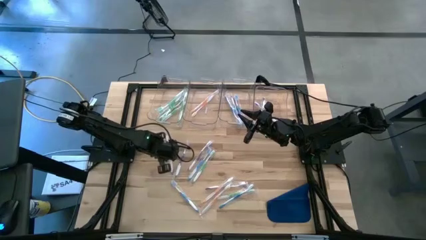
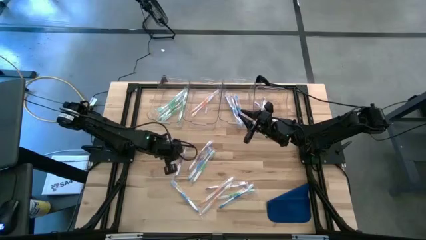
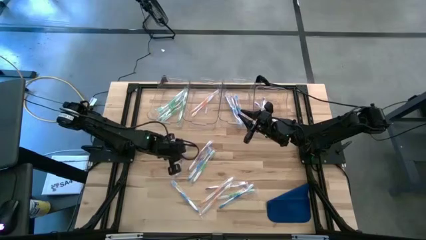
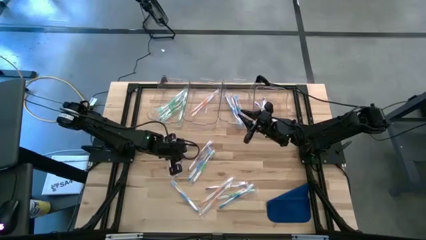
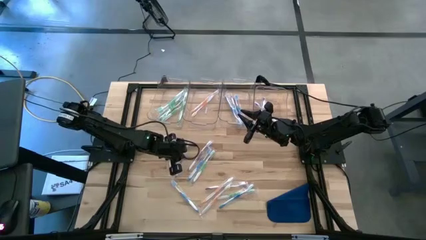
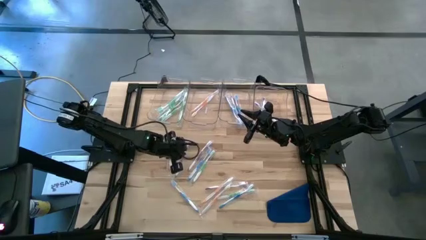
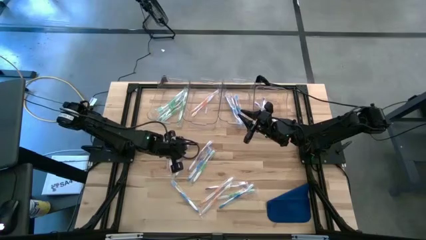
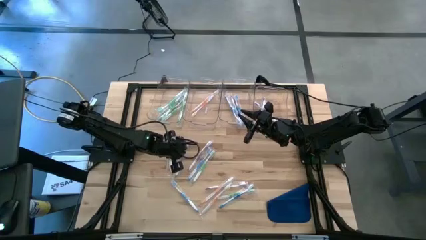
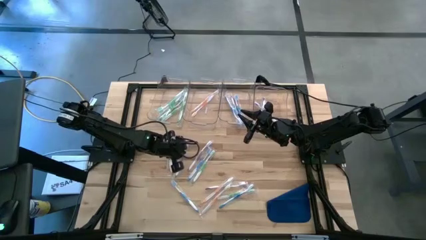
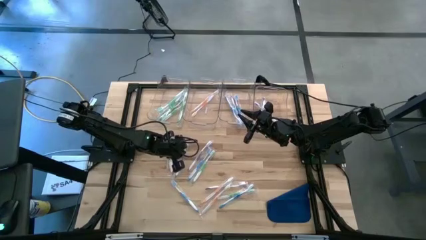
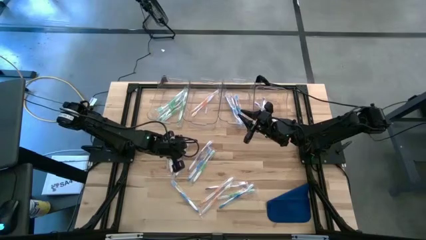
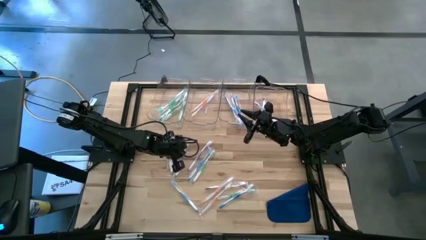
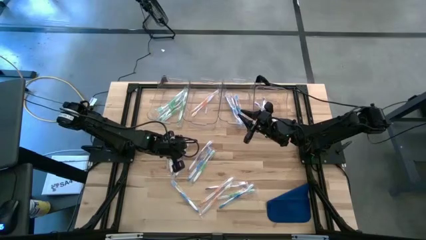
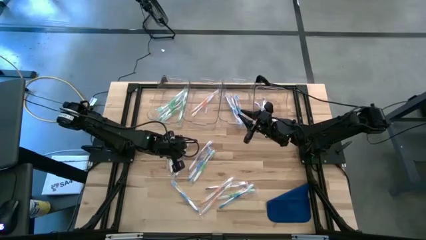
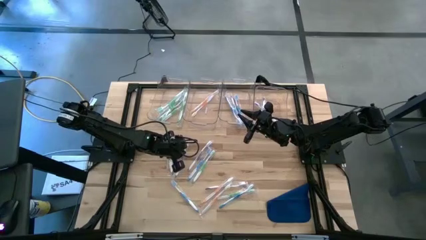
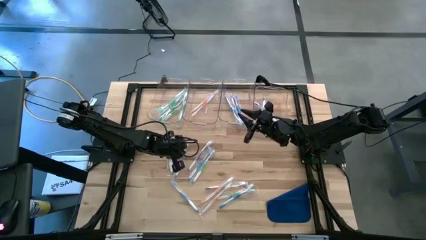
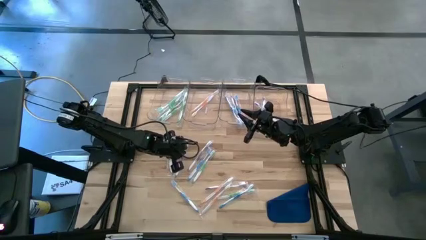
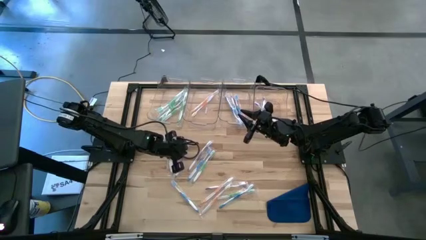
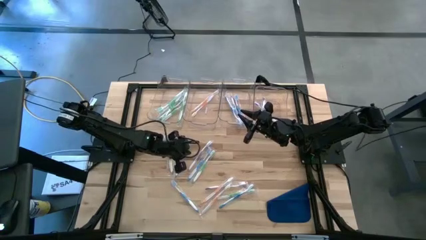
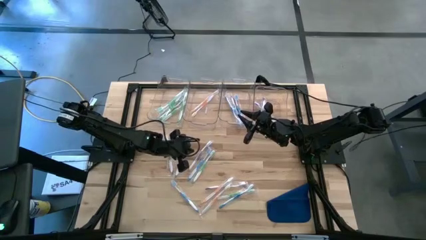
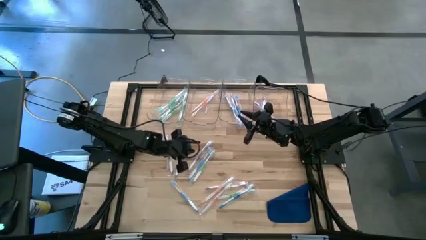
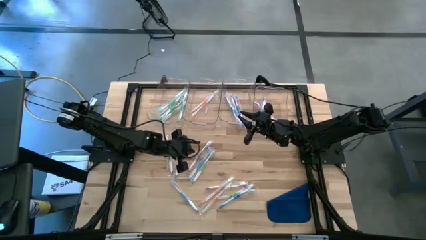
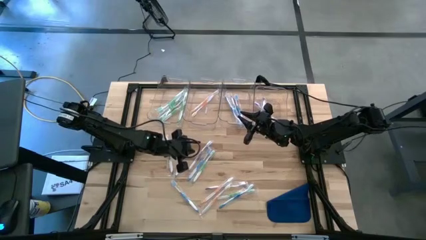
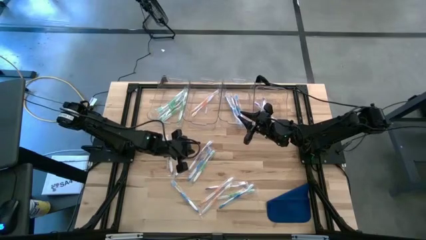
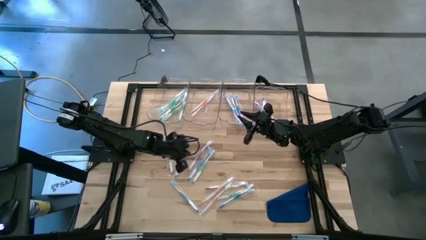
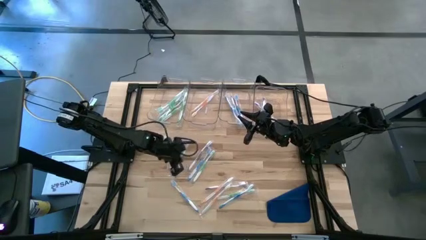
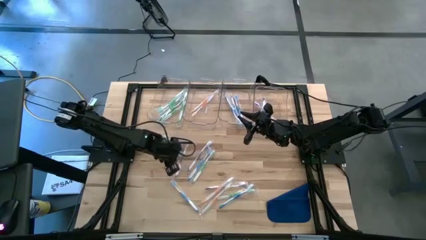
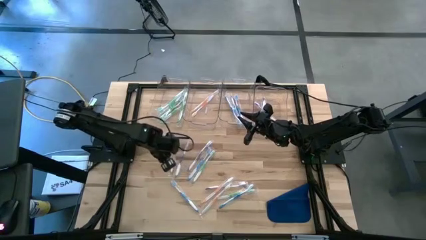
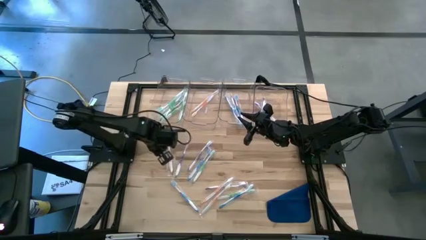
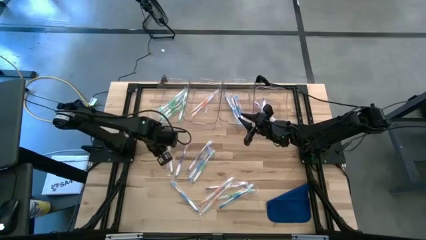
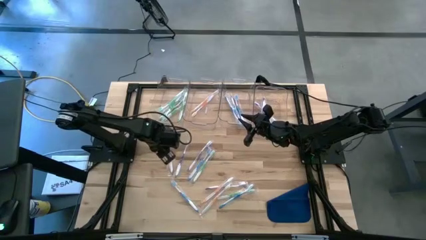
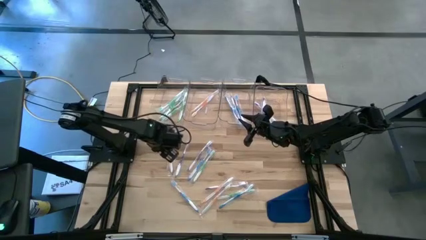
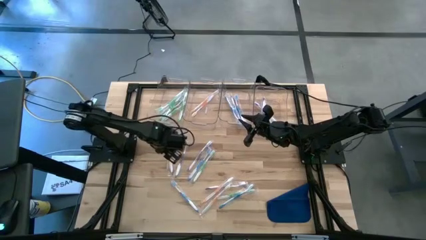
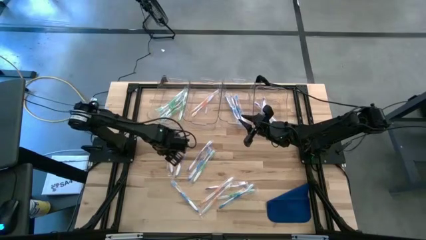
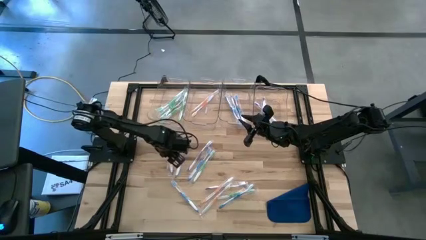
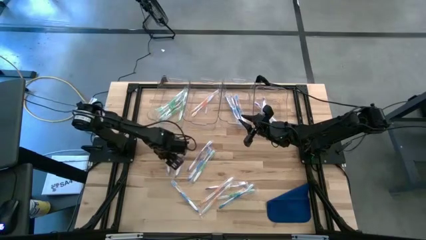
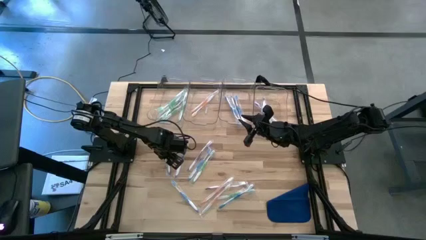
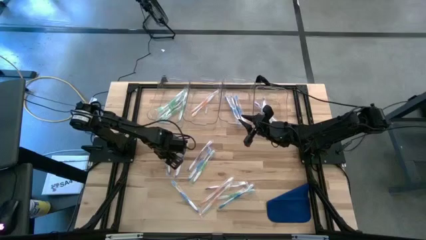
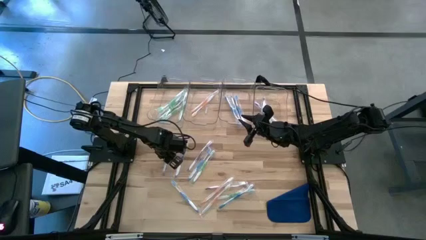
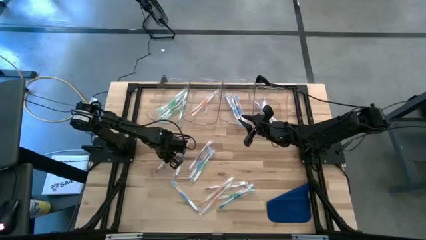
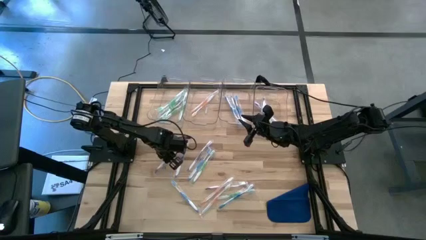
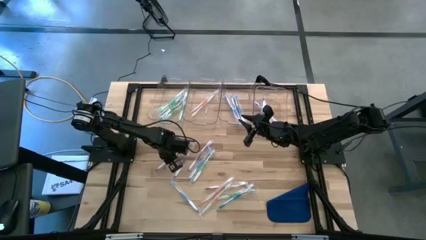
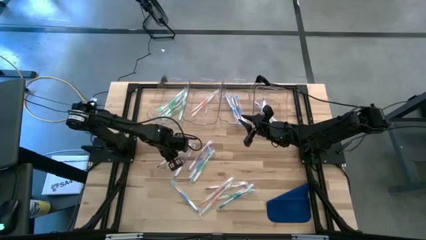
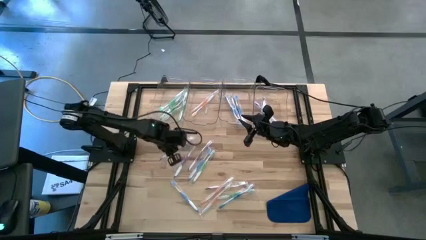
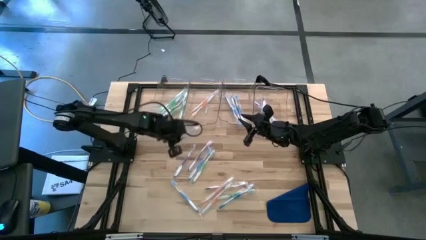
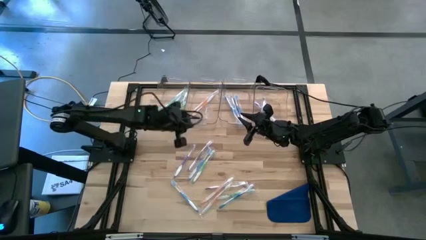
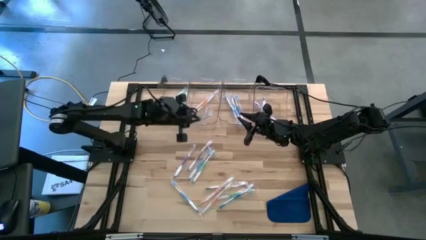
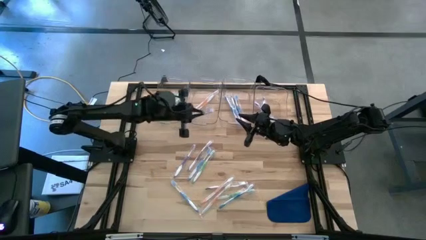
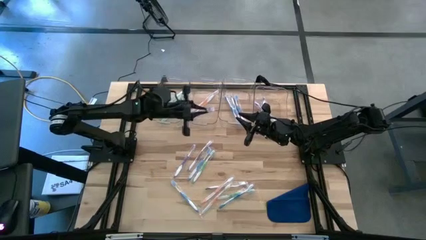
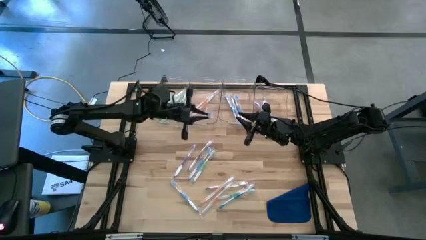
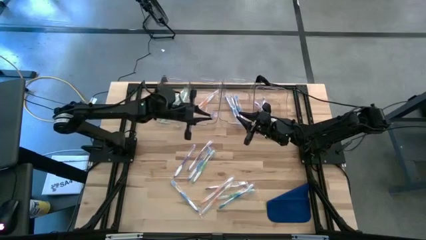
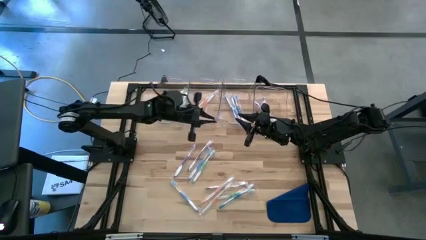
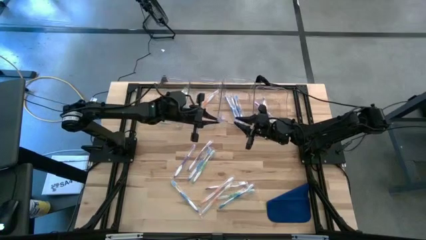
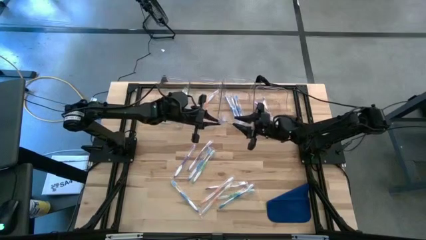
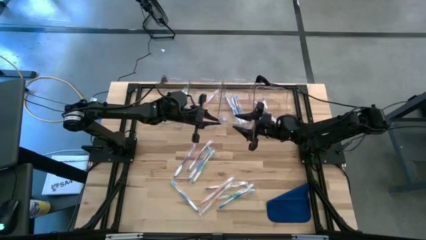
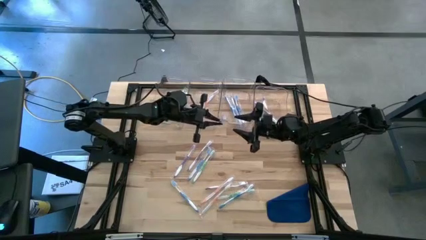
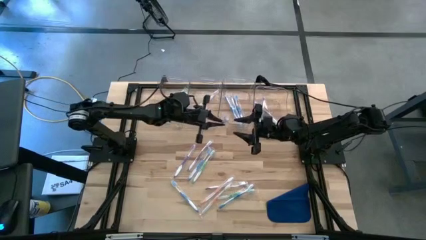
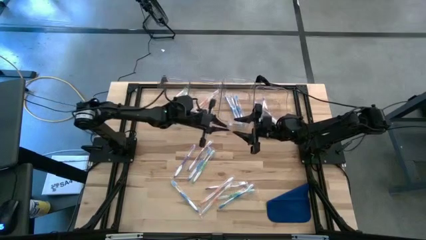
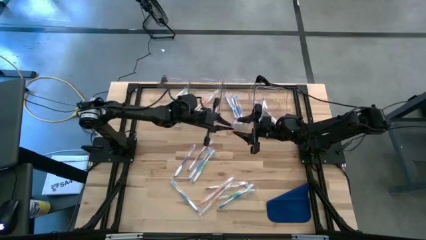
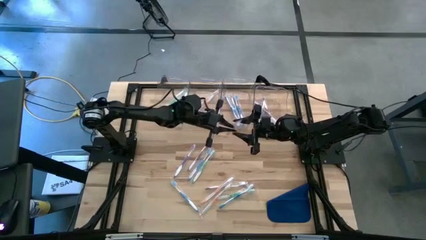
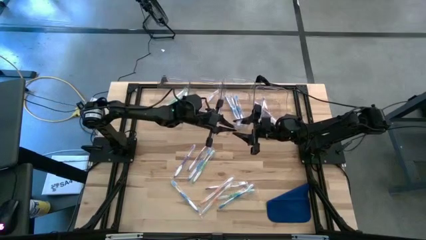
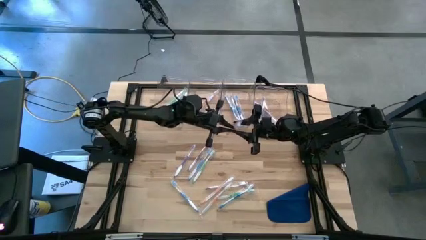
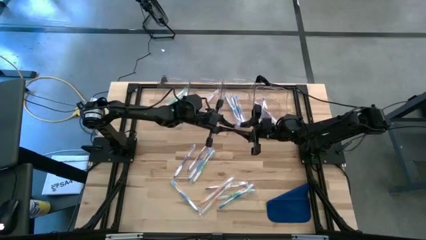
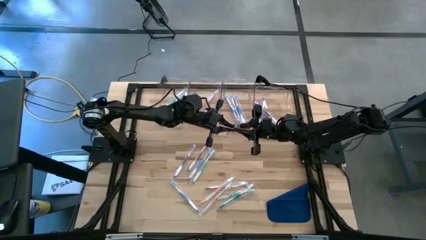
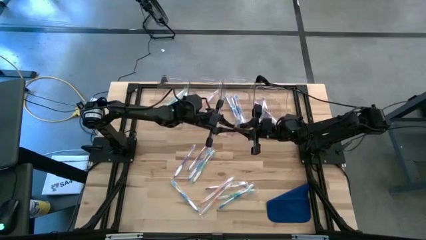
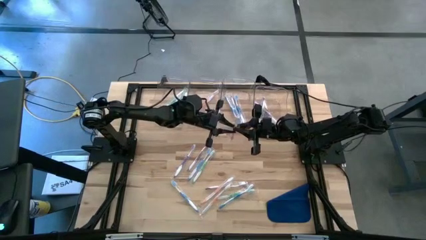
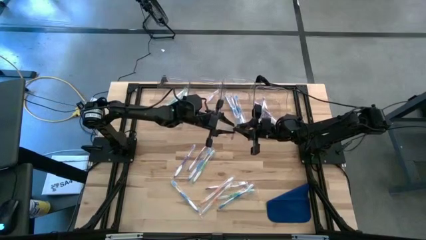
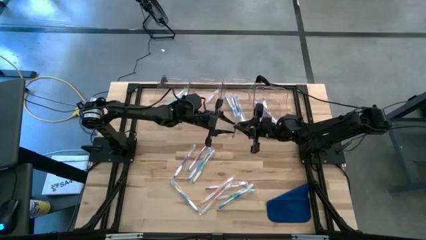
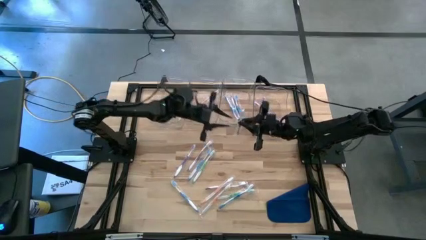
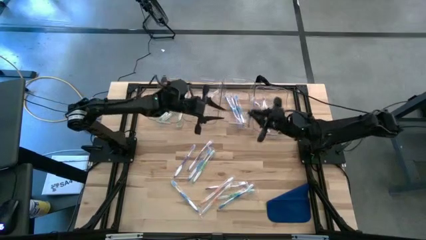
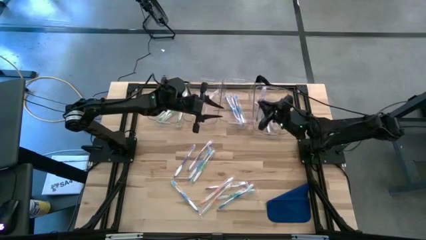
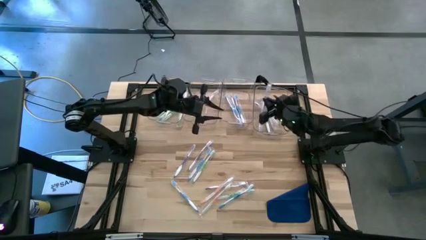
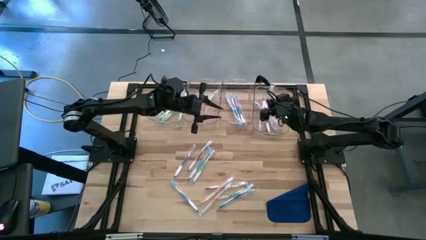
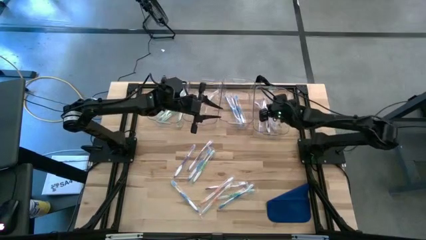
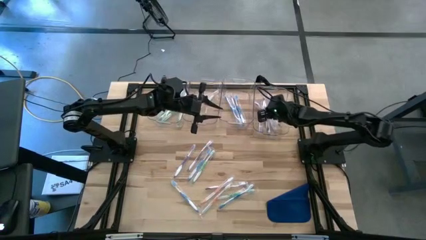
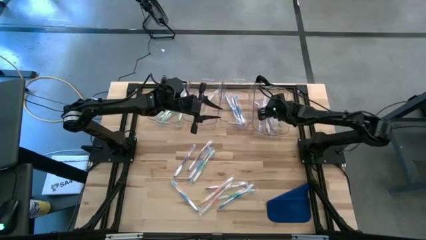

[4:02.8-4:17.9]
Task: Pick & Place Toothbrushes
Put the violet toothbrush into the right transparent bin

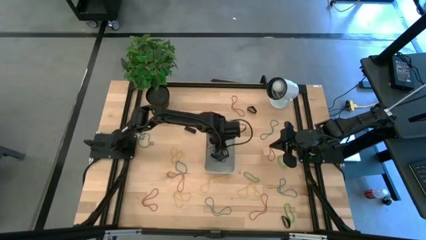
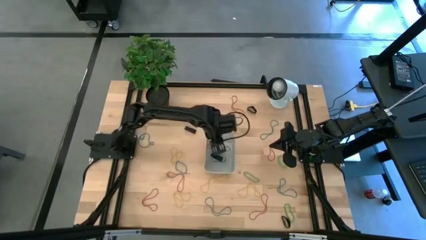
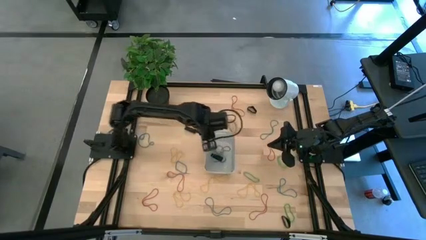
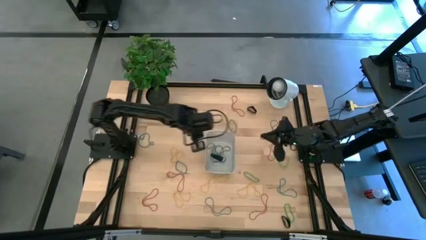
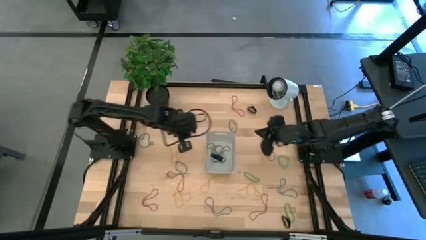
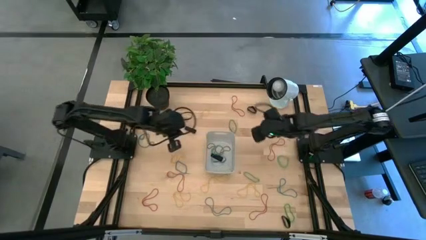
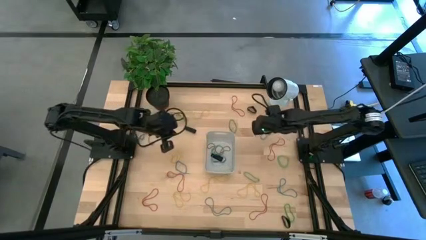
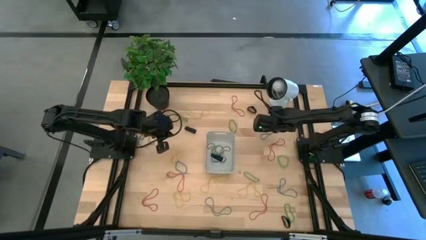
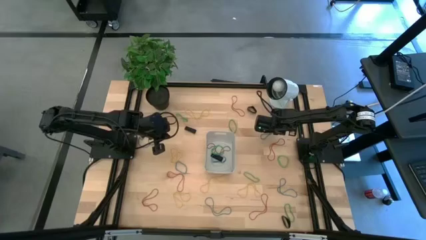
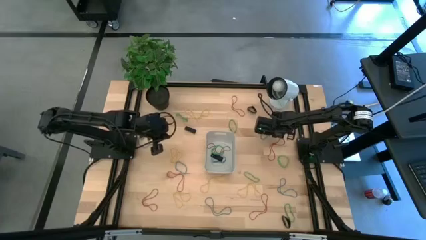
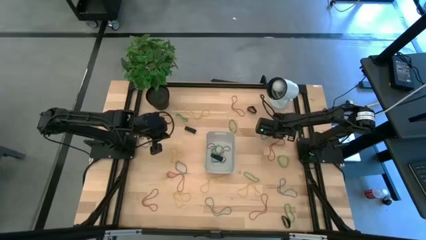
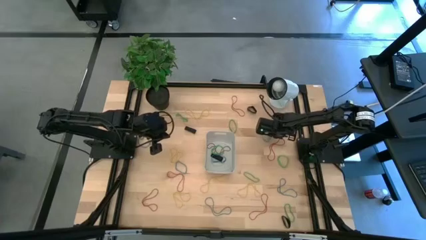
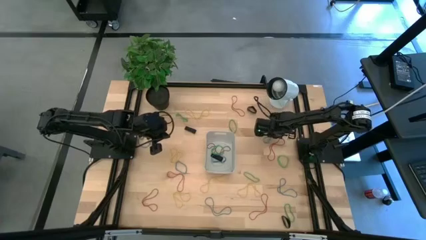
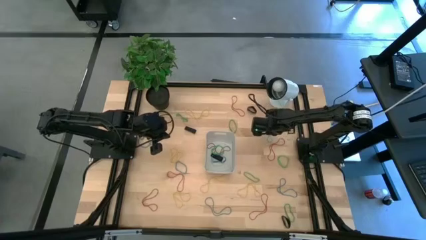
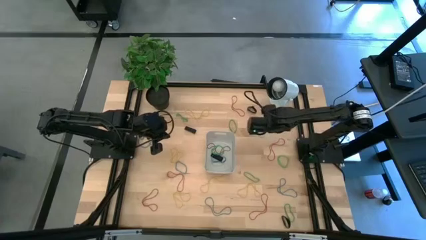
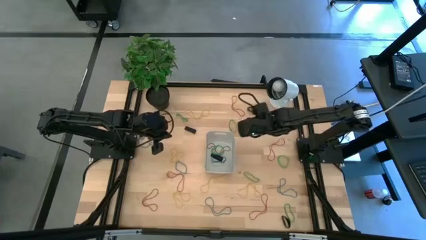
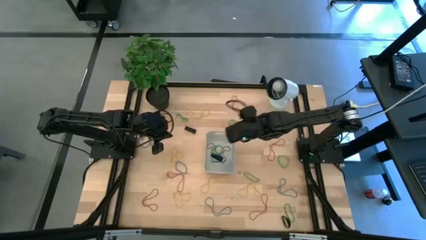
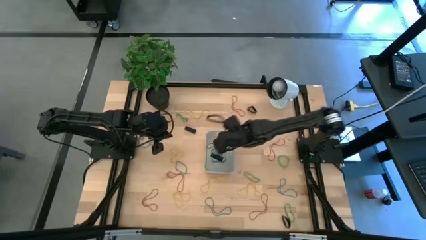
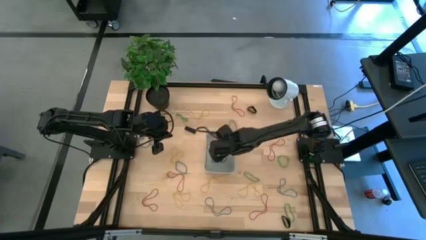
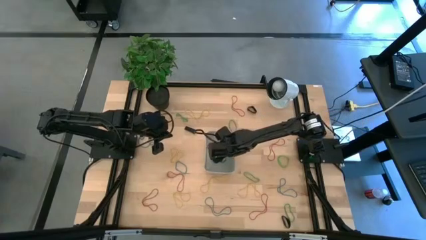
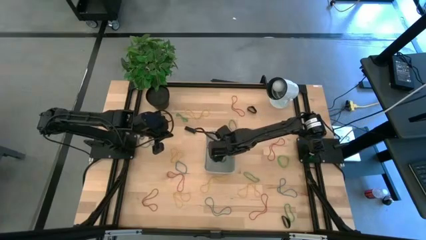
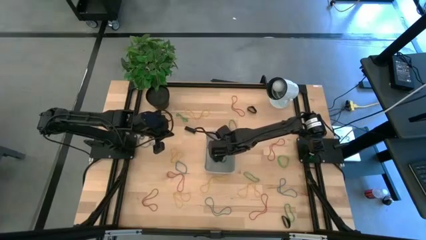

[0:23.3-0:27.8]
Task: Pick and place rubber bands into bin
Put the blue rubber band into the gray bin
